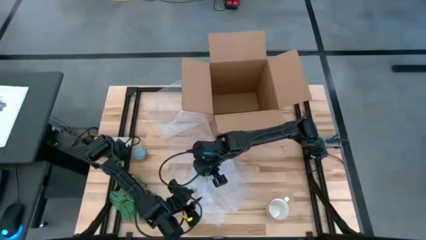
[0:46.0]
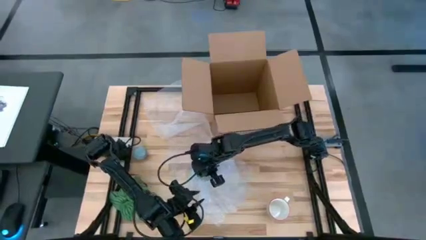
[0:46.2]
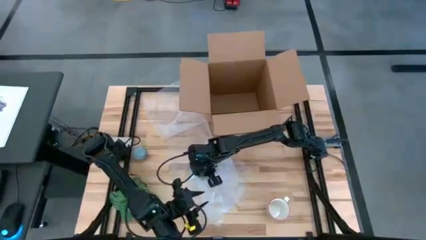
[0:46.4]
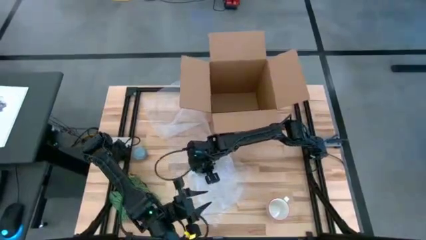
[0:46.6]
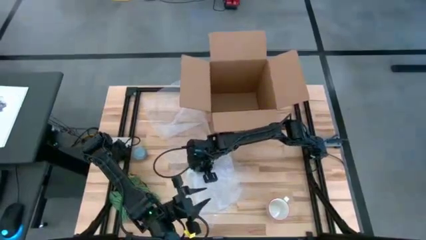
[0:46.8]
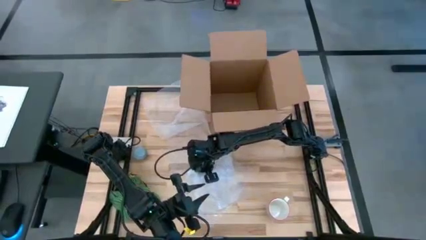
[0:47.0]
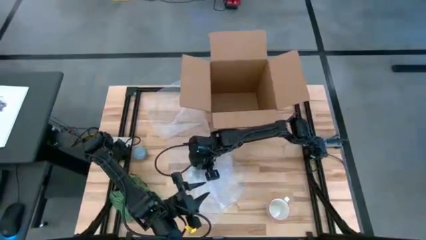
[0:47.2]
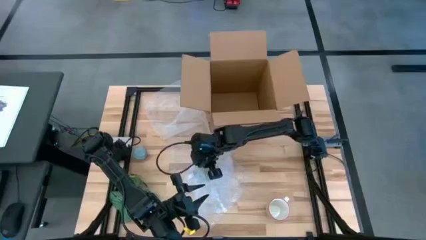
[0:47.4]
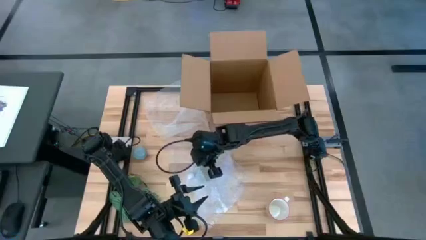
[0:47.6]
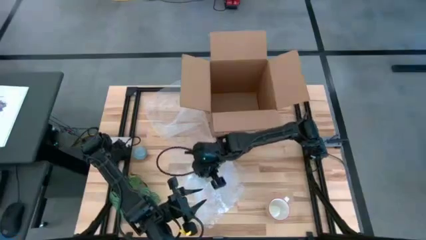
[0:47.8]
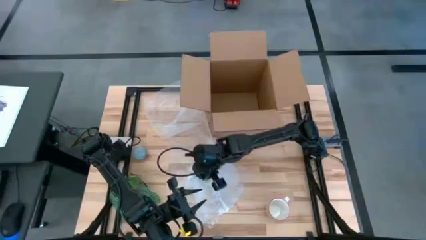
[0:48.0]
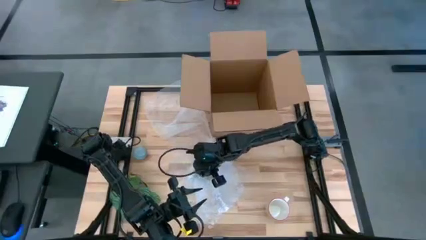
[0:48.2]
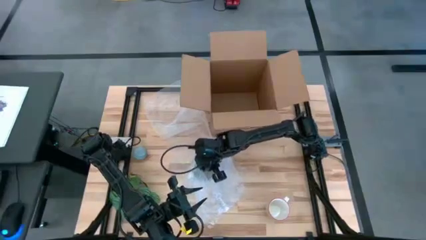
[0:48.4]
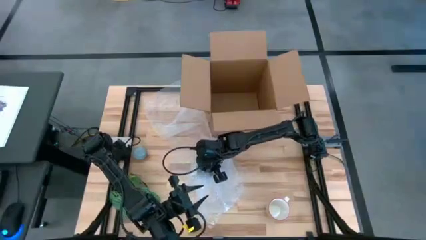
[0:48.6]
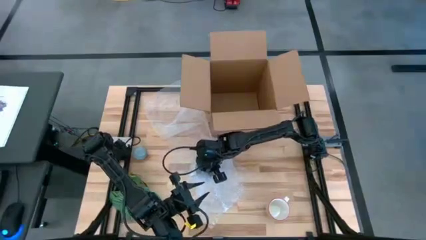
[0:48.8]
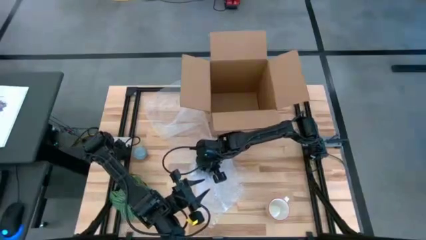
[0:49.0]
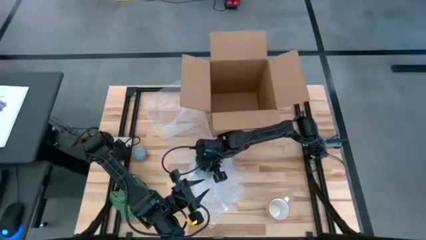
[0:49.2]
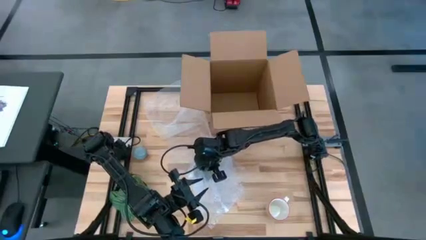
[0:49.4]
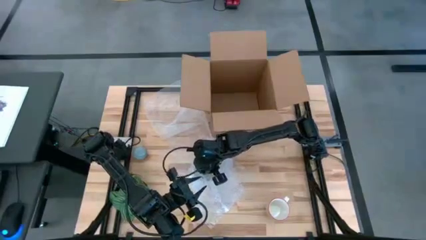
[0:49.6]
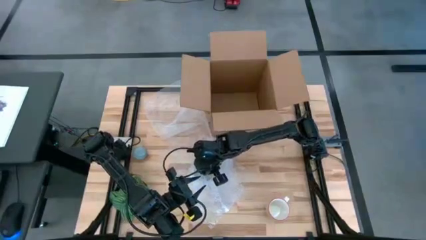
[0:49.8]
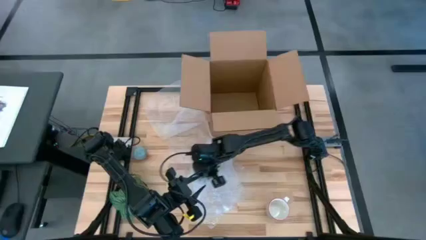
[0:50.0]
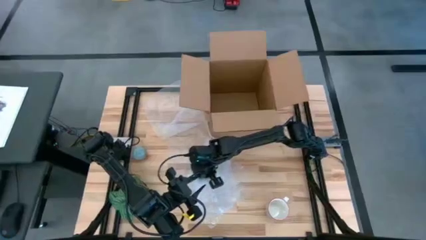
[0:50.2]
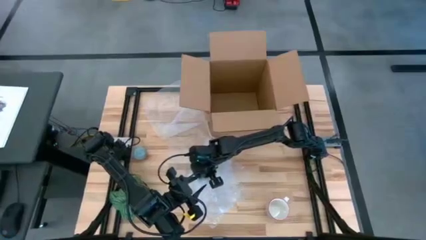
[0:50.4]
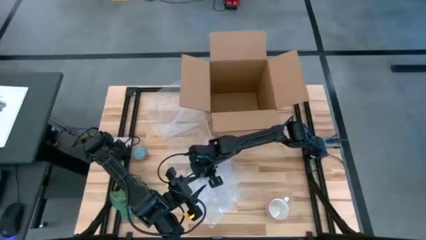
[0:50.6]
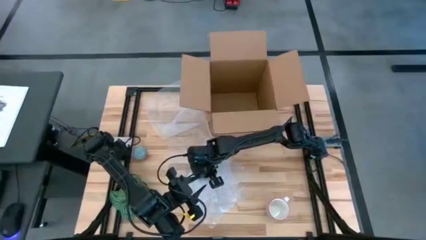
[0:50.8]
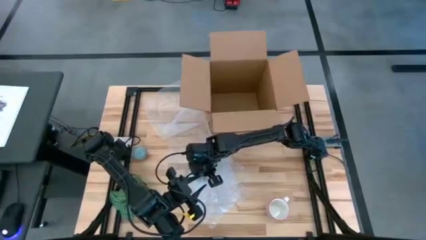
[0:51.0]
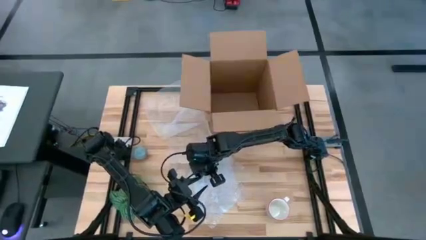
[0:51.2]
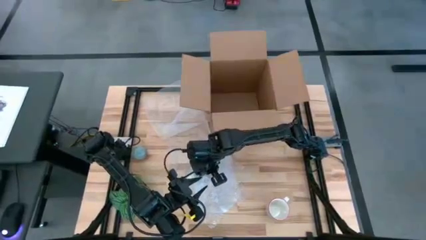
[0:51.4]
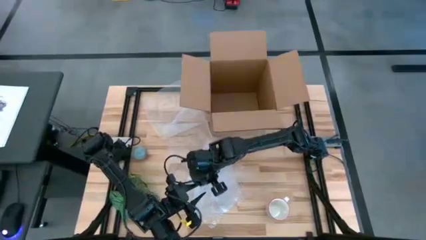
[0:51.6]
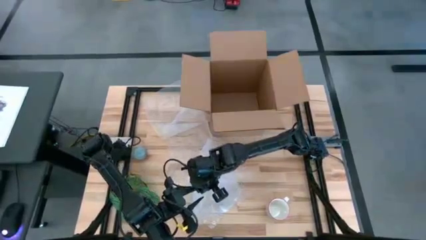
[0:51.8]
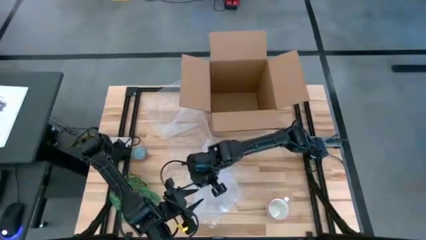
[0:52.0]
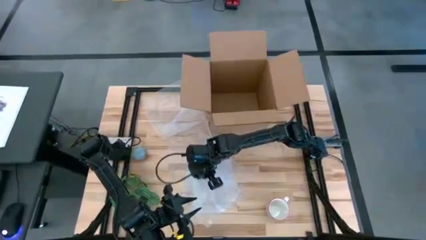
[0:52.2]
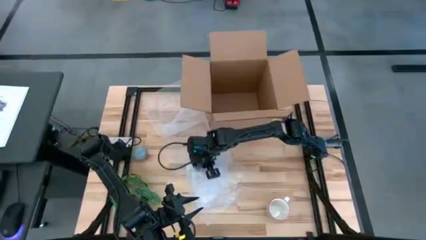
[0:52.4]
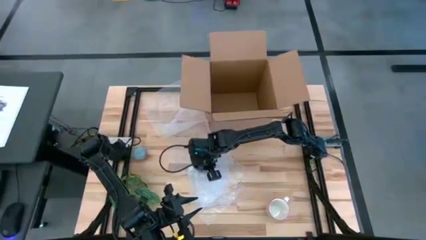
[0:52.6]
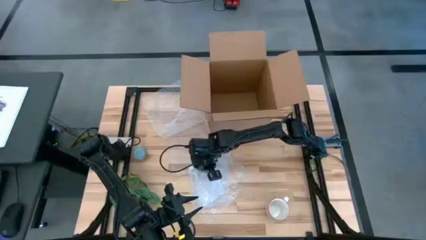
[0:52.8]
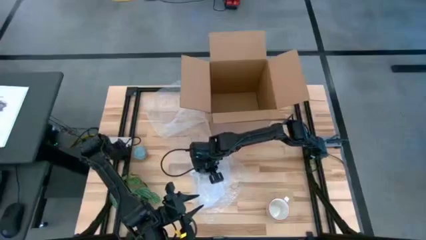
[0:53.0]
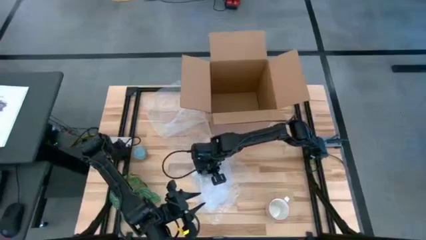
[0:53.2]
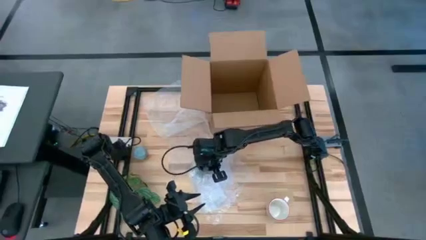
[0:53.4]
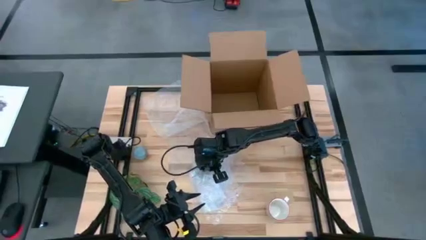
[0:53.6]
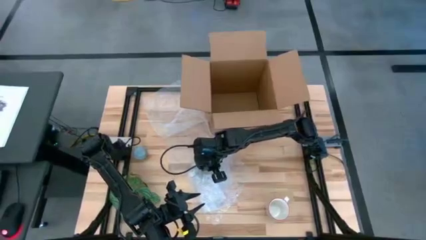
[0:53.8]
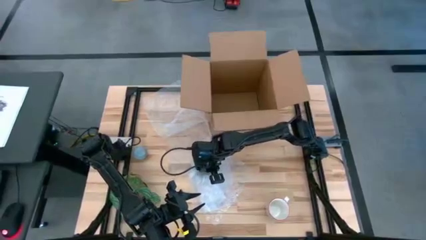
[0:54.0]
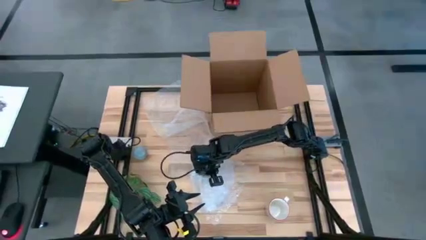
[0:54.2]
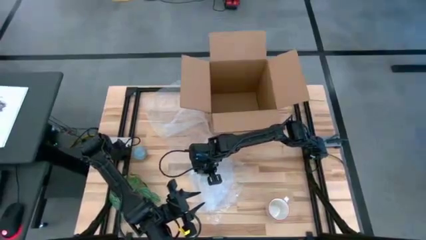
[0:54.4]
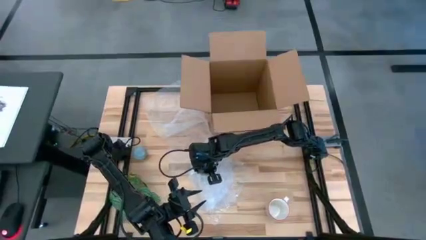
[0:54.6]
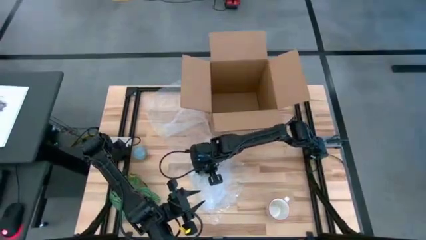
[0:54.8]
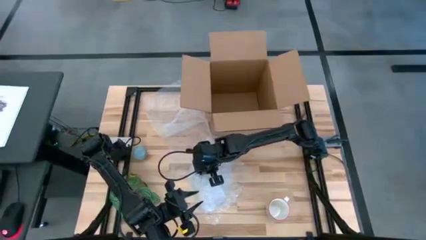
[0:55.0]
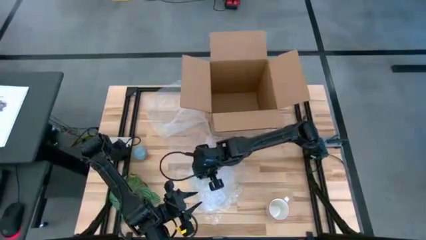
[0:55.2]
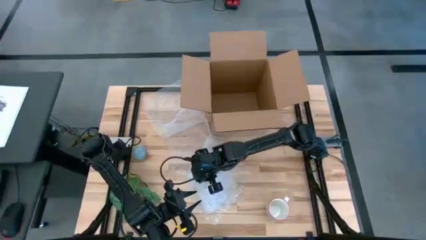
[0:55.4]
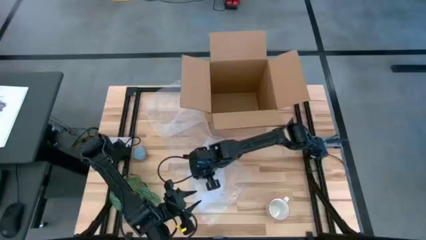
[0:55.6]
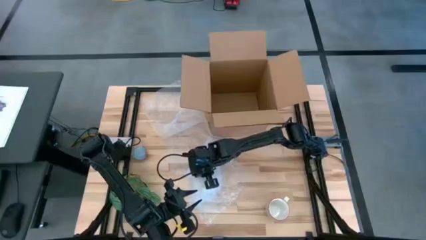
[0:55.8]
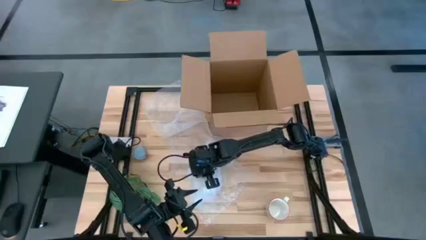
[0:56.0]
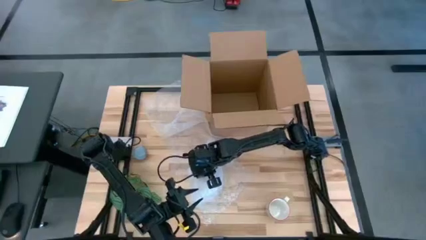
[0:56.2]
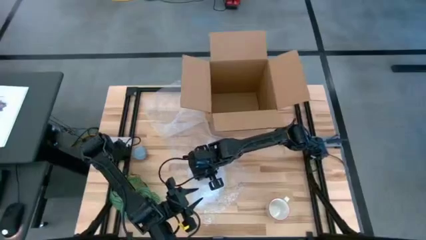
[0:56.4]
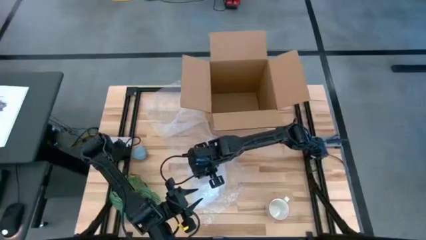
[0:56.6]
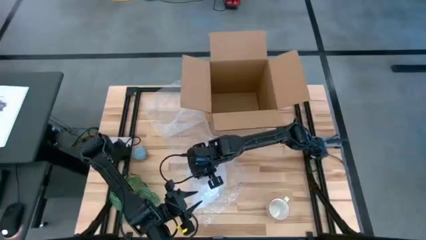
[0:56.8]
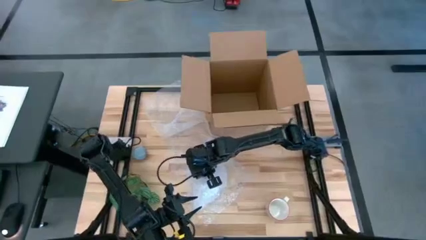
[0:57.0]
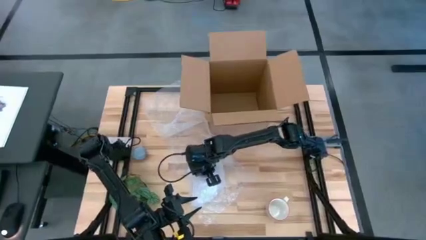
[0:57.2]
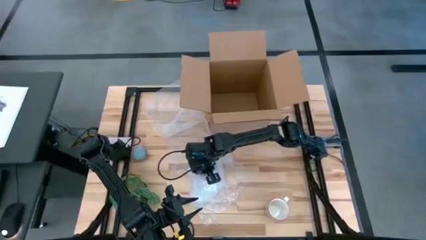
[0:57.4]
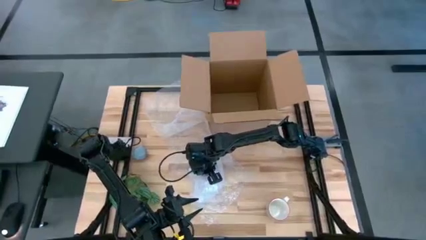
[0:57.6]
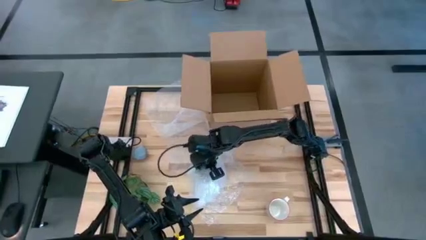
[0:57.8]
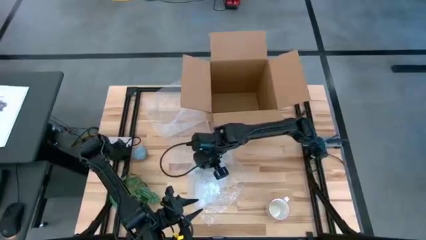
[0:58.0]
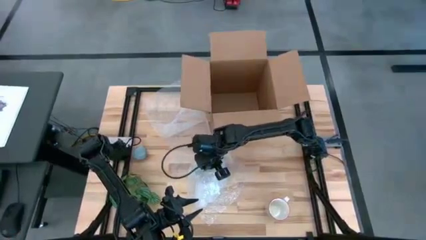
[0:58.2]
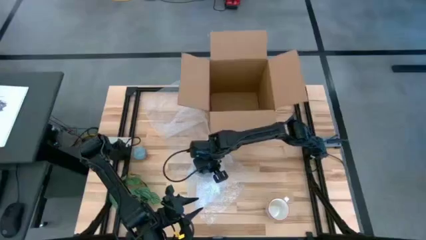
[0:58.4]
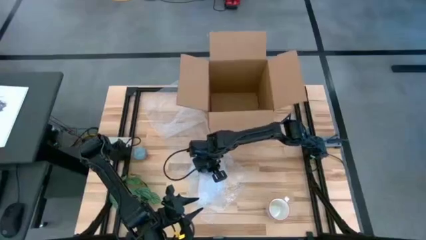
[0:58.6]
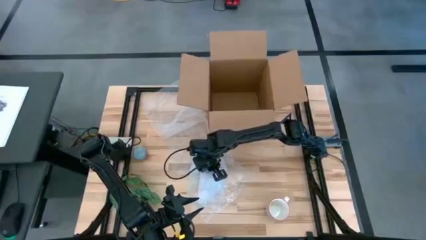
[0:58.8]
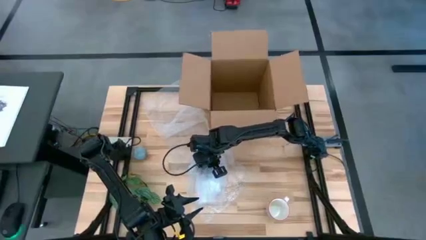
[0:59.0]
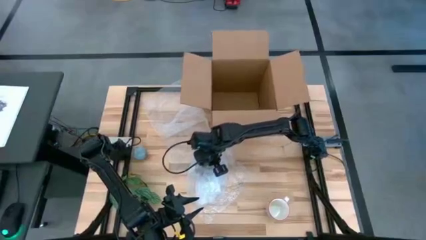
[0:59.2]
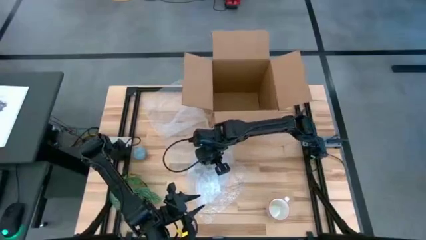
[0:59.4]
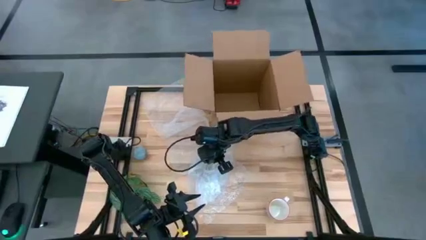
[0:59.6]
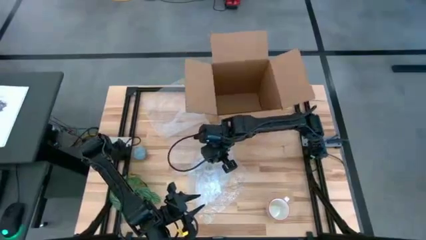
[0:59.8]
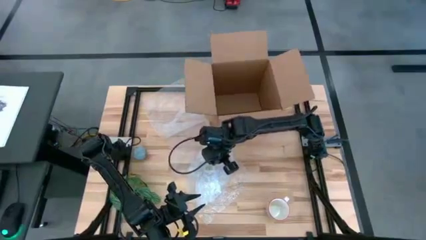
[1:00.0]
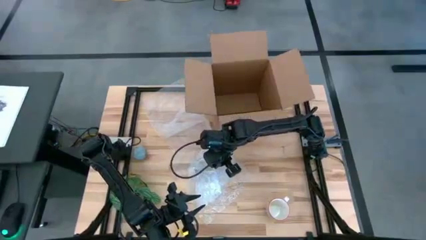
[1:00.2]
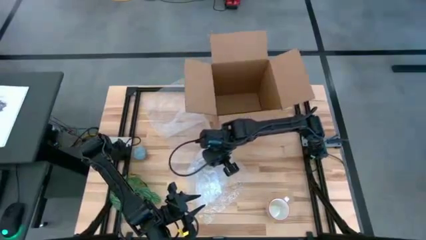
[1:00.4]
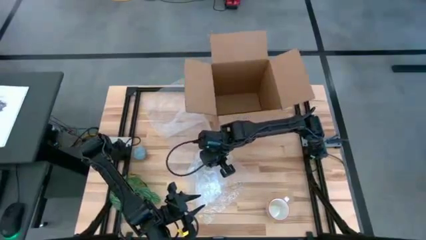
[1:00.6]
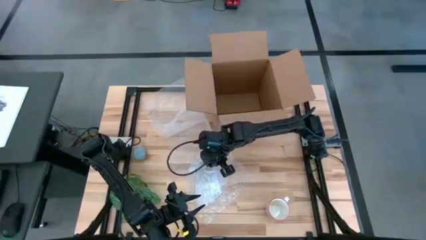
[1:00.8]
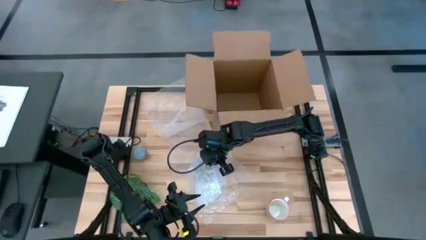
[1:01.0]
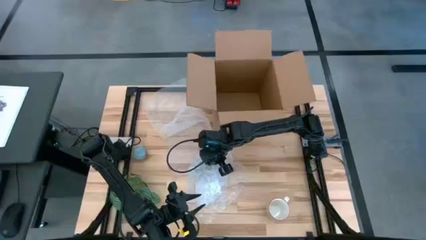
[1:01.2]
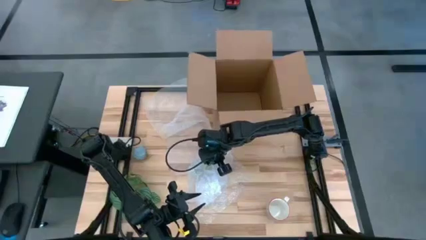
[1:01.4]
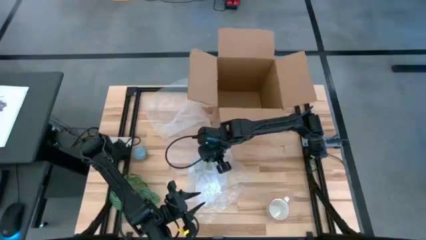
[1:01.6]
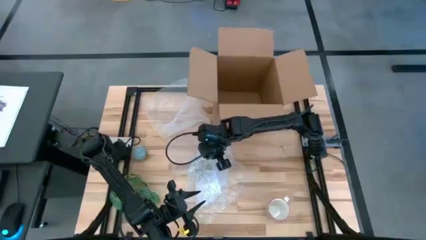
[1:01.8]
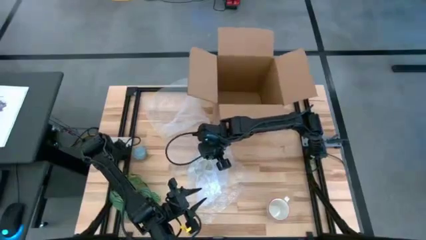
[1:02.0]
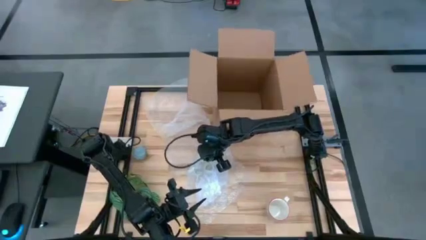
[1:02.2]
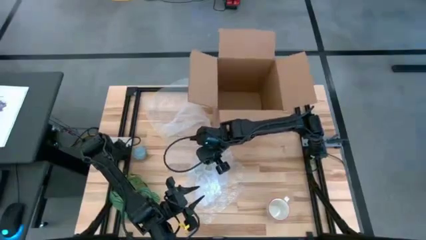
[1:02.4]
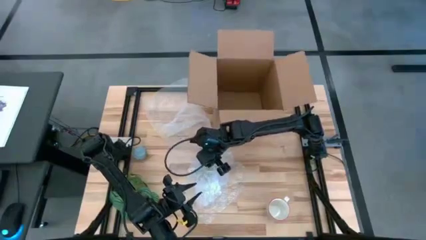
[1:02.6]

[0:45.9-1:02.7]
Task: wrap mug
Wrap the white blue mug with bubble wrap
